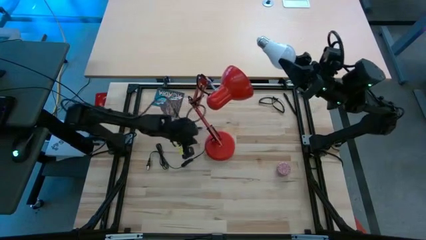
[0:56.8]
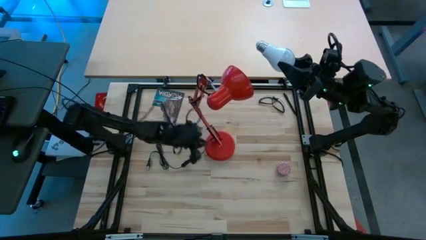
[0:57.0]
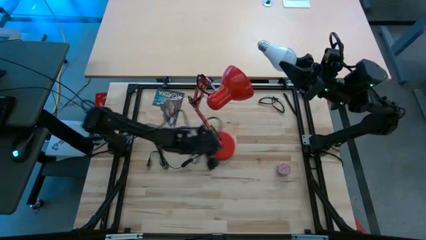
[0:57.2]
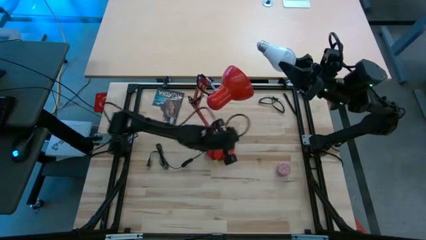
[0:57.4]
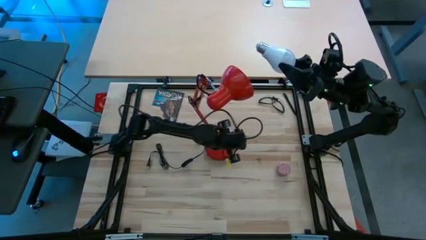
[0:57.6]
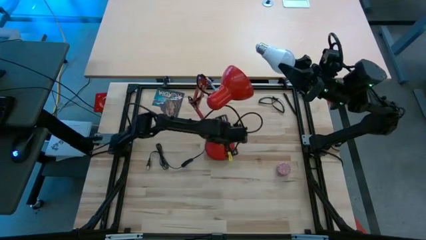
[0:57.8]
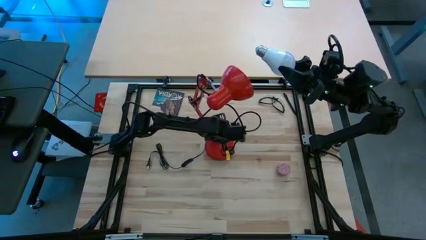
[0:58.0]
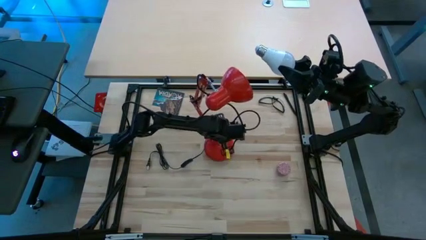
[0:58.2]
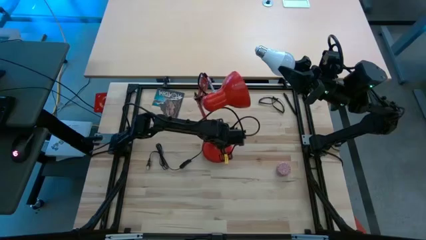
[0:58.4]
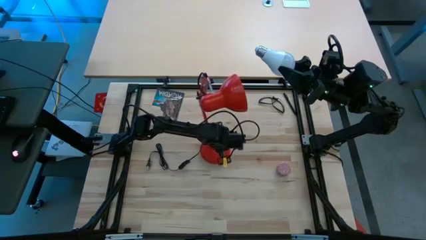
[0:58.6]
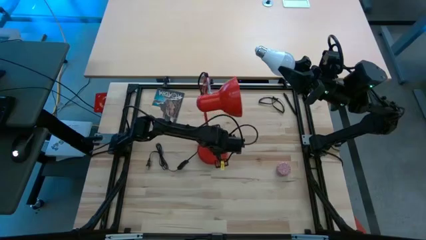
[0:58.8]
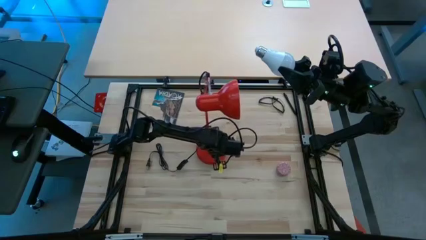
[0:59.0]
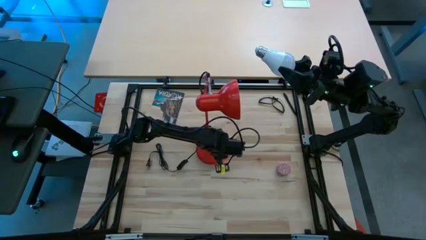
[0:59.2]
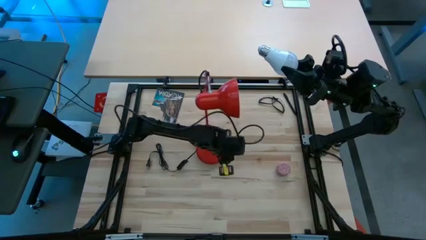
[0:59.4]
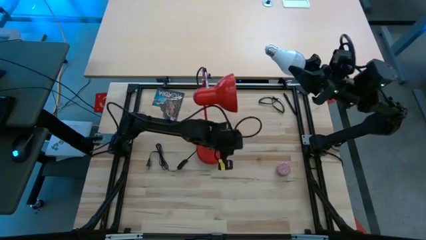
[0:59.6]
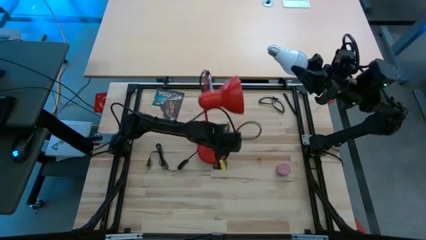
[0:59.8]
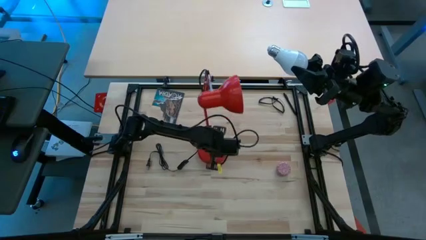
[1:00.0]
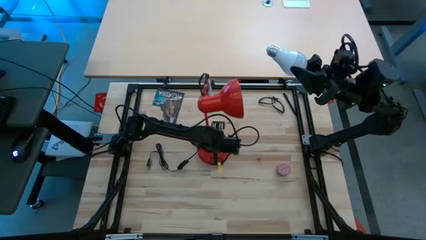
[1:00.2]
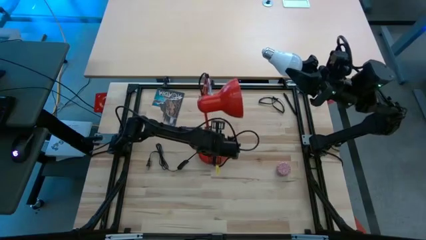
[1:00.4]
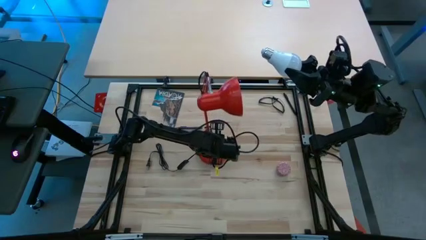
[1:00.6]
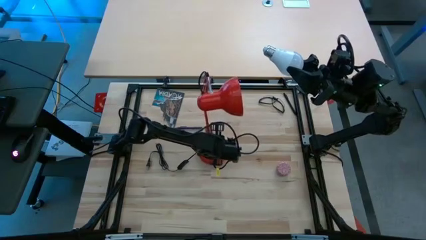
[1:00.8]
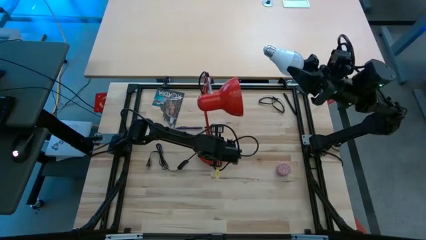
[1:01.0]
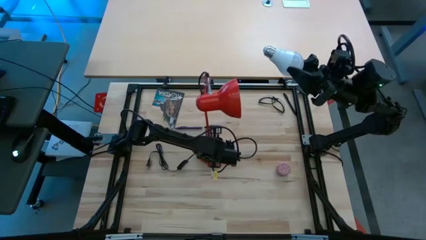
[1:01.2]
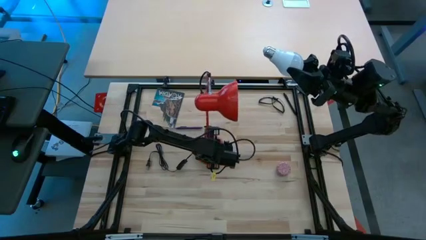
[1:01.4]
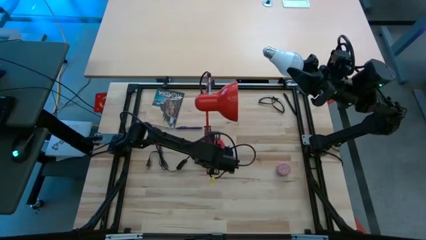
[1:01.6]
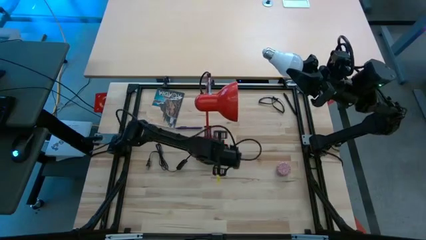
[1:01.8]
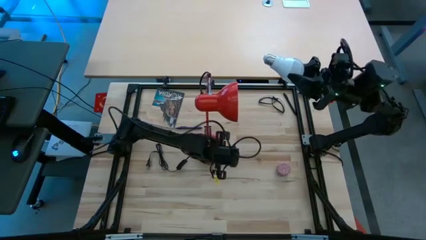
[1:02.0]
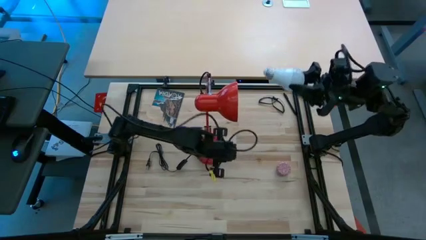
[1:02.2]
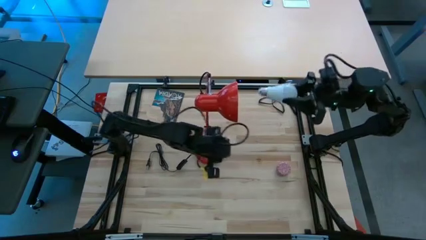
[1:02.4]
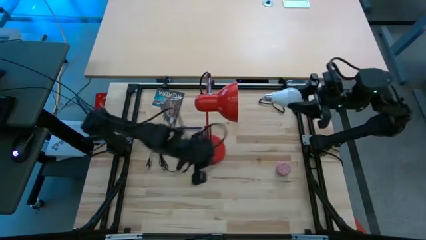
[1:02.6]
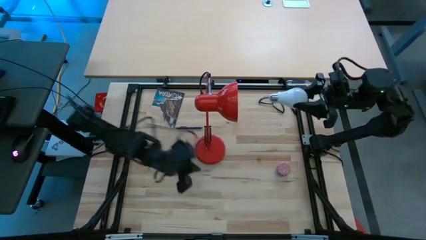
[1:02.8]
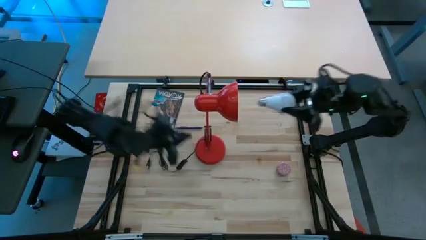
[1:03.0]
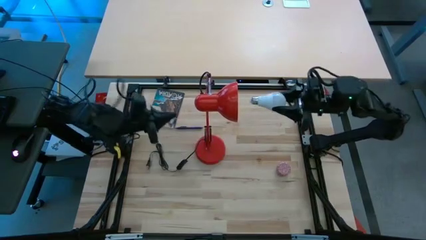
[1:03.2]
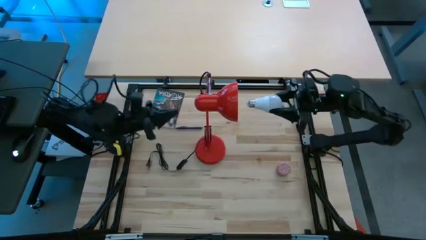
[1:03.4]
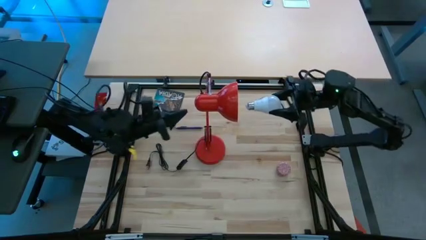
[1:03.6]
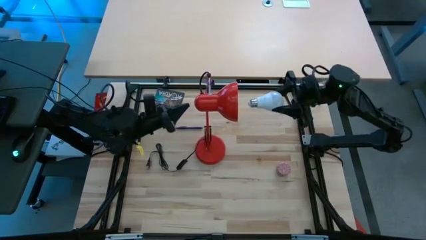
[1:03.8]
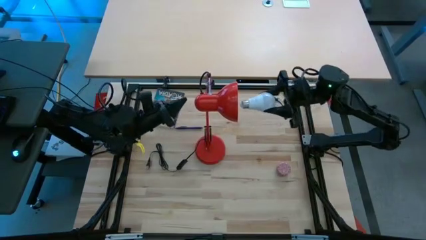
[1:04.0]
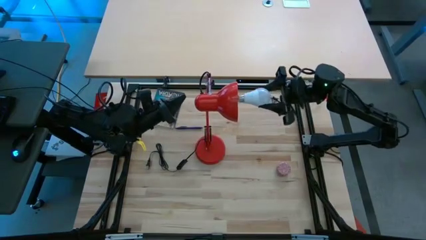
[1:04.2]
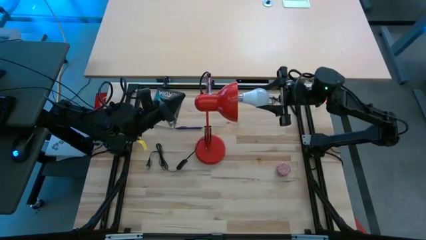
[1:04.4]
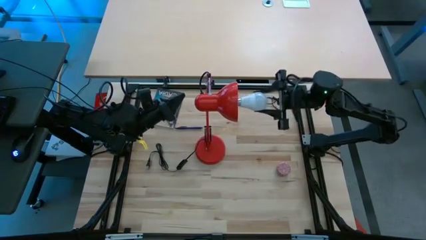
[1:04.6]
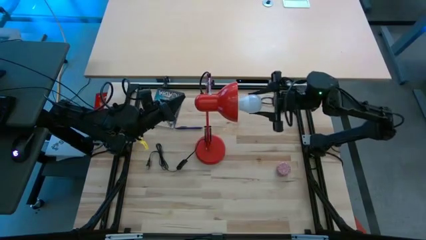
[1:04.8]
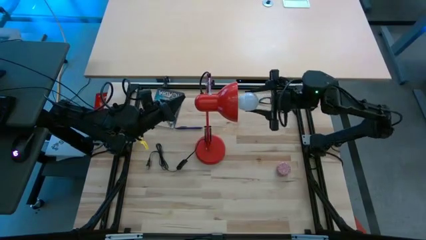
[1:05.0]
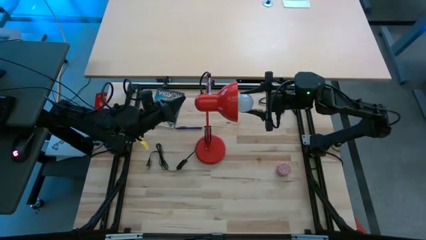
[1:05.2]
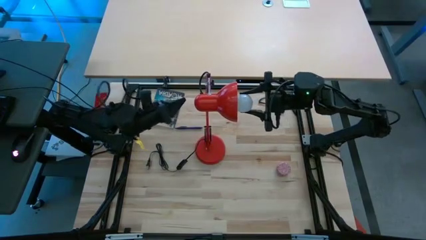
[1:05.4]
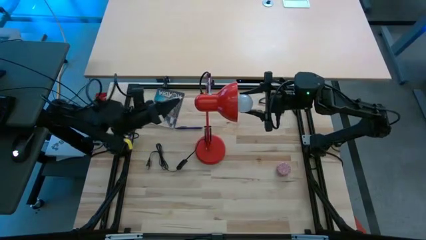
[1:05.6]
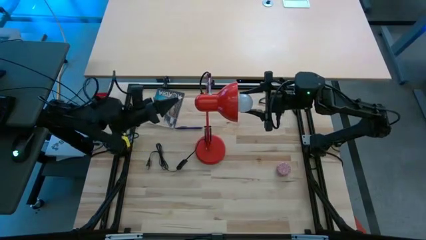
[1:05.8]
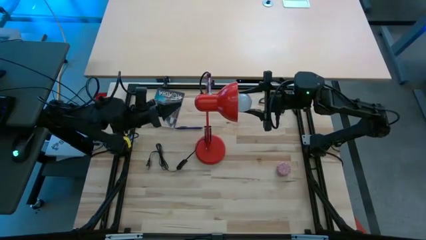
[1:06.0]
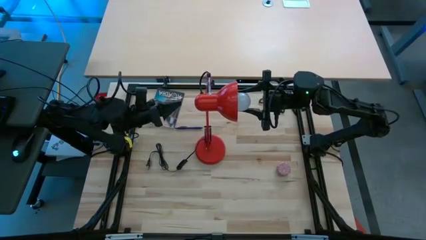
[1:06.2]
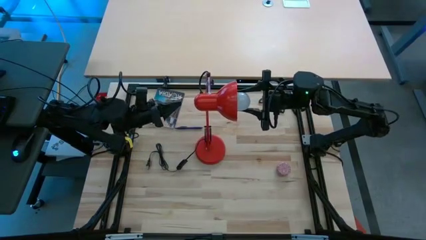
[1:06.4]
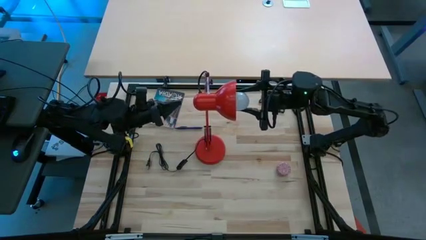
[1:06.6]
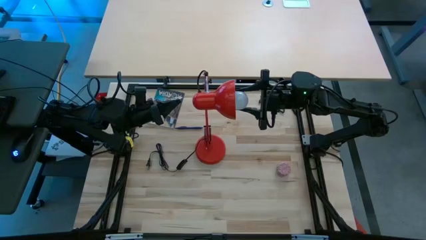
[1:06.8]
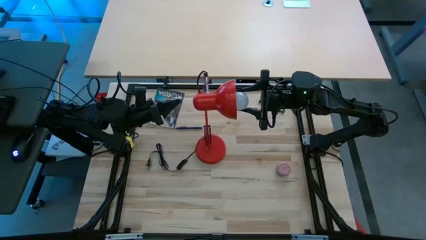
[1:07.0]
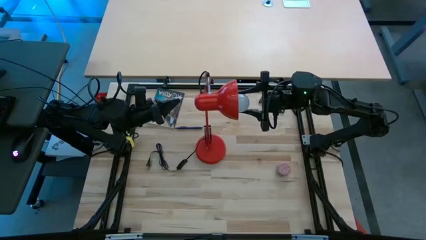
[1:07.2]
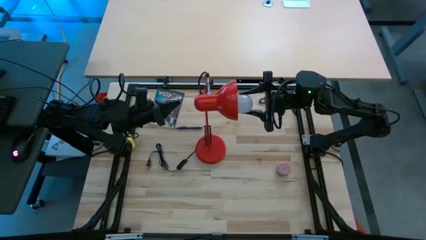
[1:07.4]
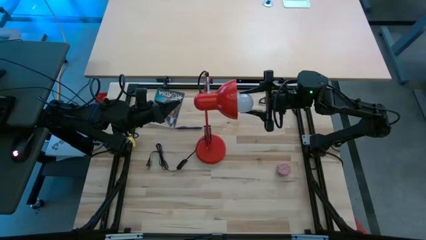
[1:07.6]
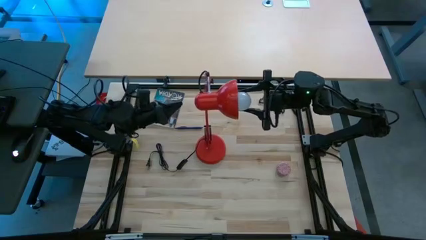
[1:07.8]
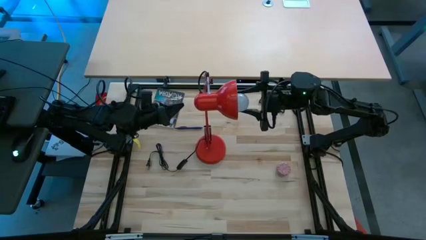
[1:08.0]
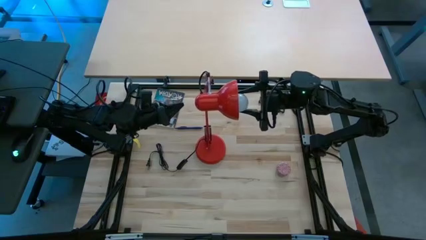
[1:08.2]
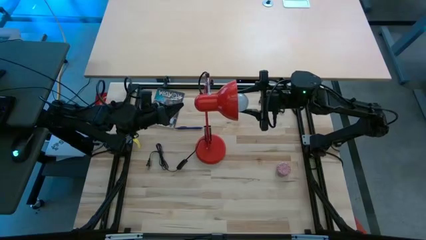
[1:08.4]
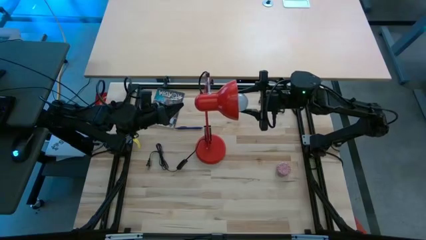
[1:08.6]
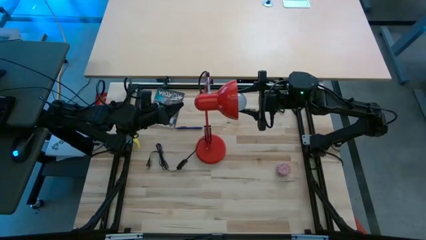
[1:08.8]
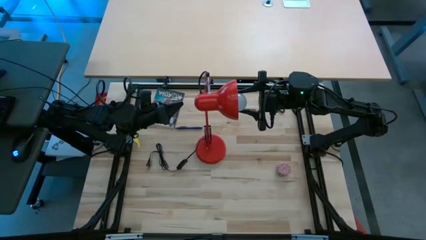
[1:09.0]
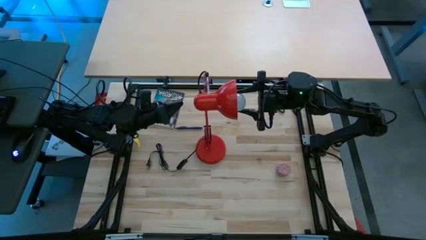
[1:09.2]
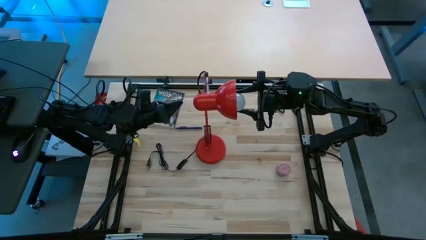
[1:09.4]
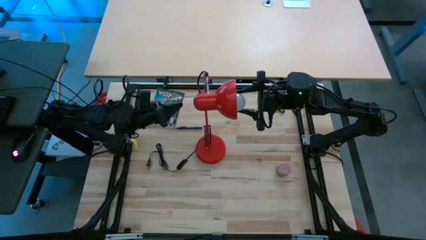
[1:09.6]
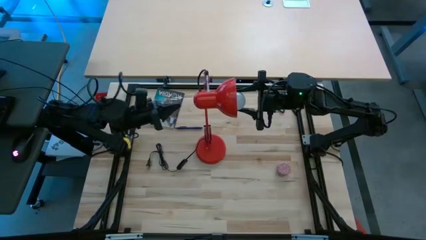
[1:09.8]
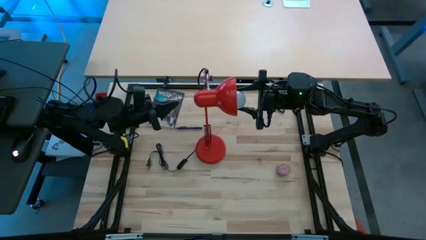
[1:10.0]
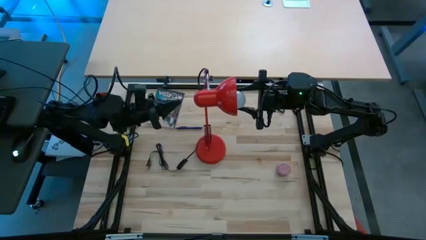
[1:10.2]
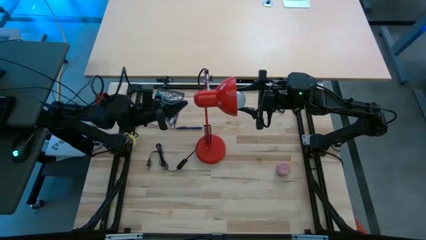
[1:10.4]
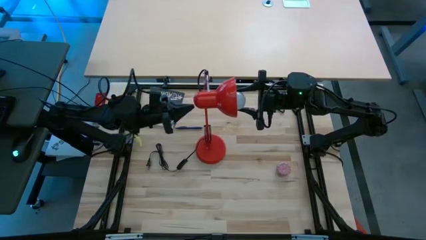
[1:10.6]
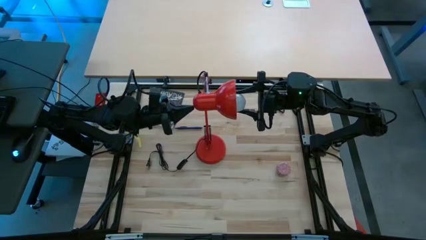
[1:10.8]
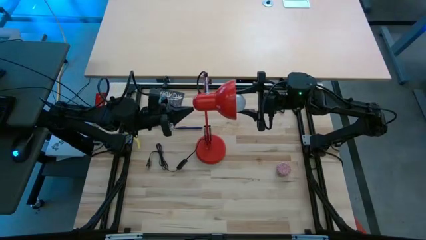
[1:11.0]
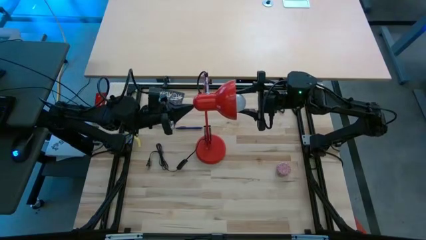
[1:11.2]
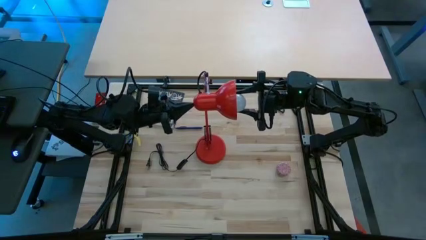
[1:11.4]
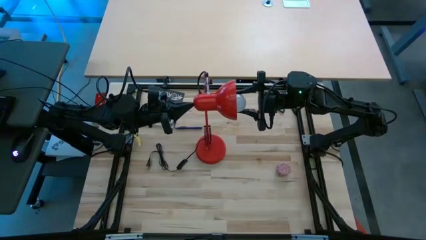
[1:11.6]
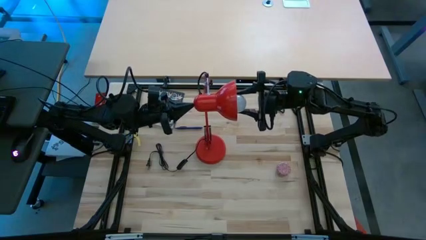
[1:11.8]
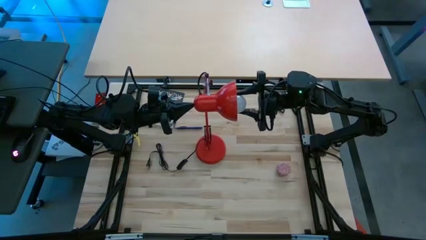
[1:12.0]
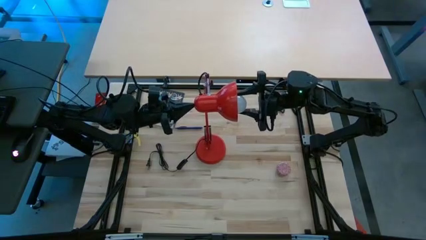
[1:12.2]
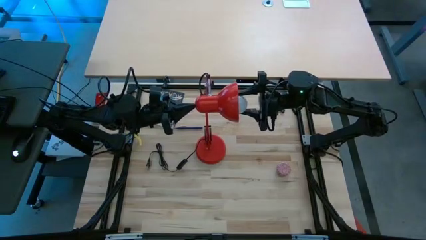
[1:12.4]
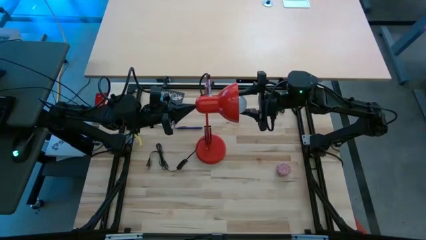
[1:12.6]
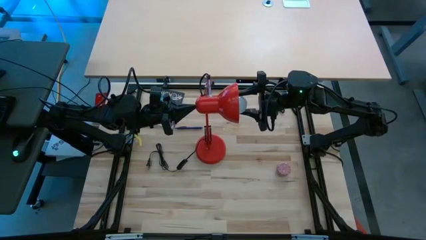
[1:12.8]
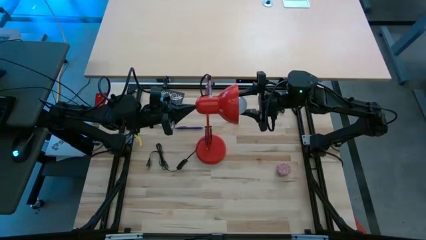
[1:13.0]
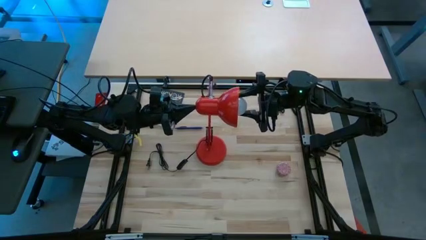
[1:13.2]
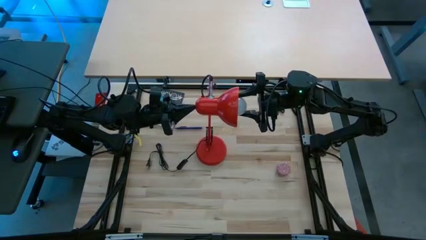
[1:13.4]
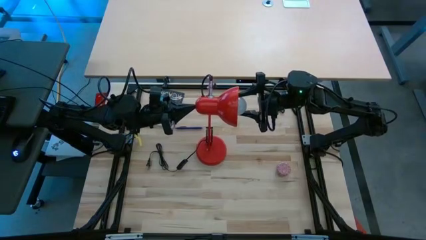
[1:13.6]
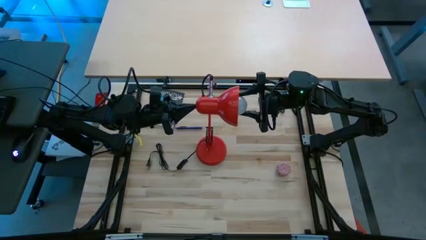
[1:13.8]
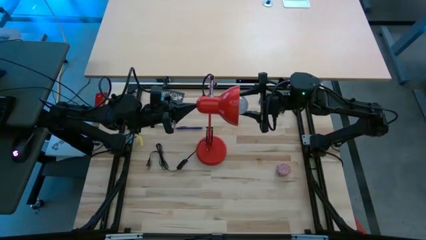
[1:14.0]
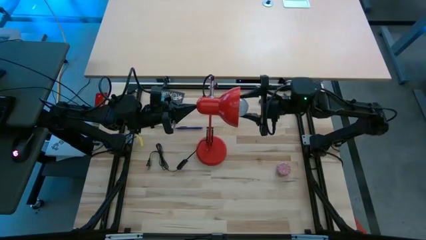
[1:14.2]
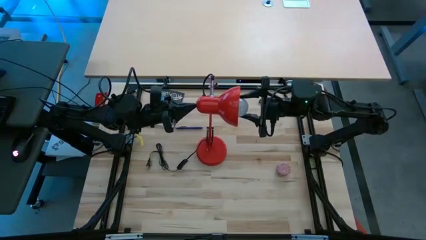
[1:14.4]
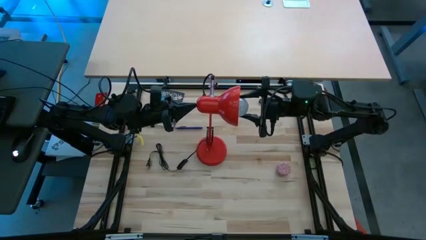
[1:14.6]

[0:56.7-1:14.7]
Task: Screw lightbulb
Insert the lightbulb on the lamp
